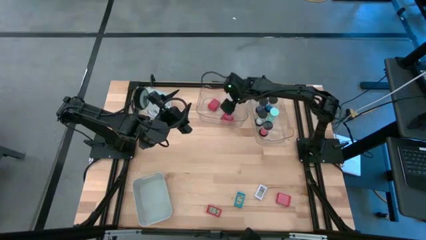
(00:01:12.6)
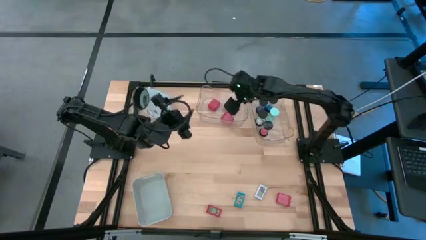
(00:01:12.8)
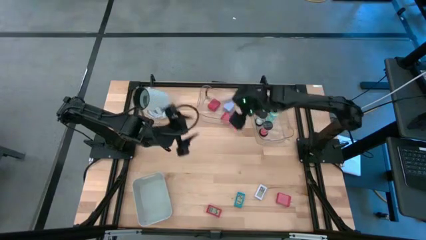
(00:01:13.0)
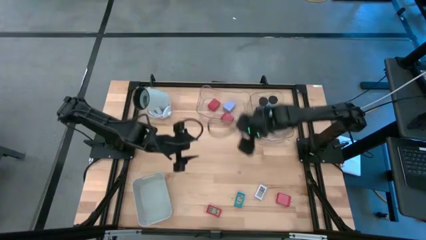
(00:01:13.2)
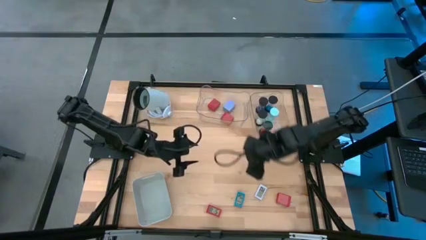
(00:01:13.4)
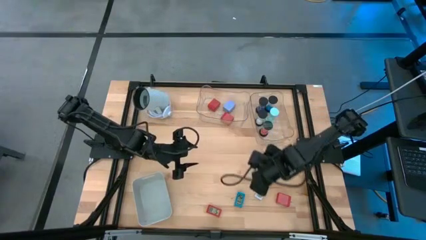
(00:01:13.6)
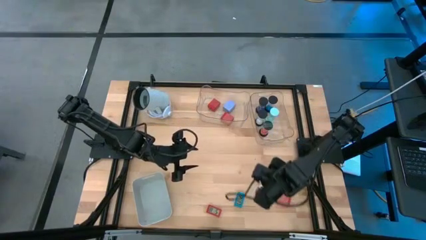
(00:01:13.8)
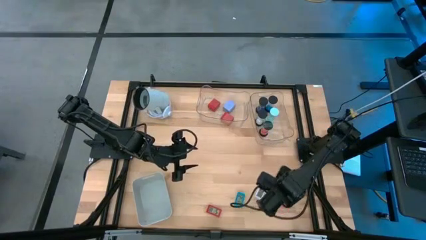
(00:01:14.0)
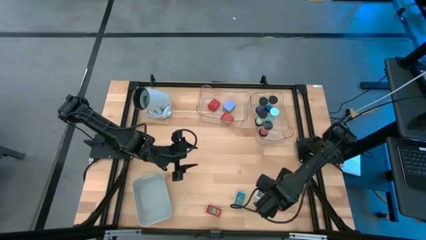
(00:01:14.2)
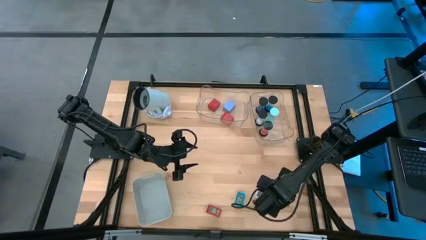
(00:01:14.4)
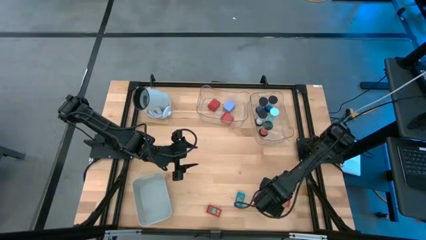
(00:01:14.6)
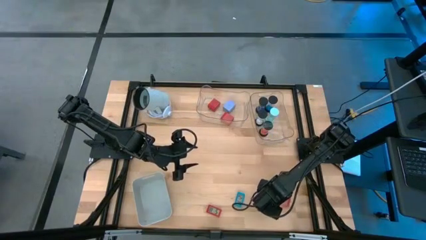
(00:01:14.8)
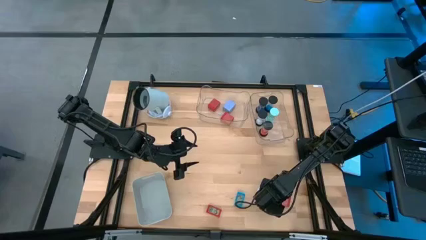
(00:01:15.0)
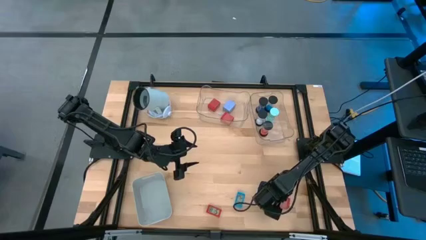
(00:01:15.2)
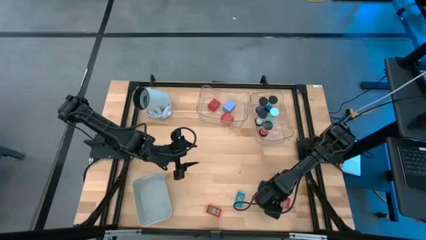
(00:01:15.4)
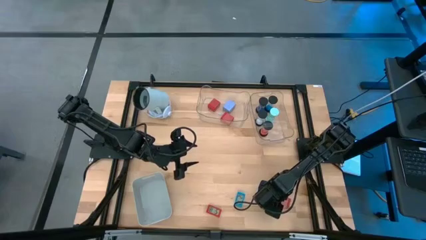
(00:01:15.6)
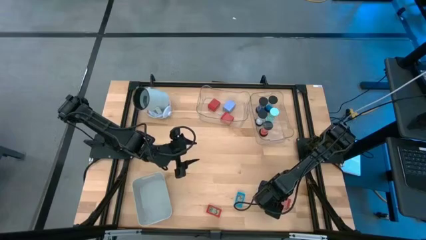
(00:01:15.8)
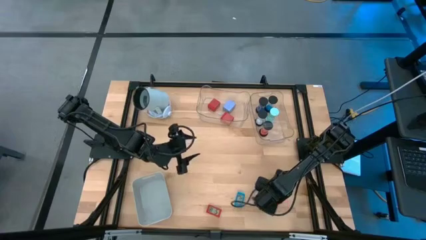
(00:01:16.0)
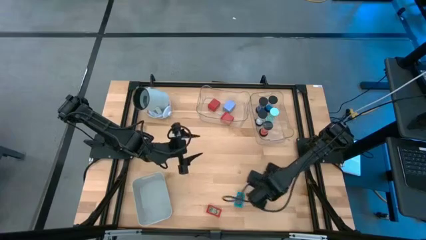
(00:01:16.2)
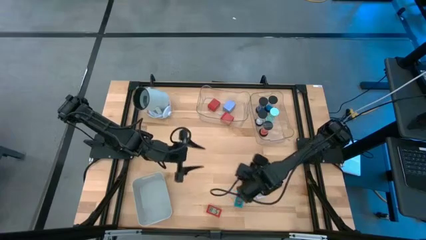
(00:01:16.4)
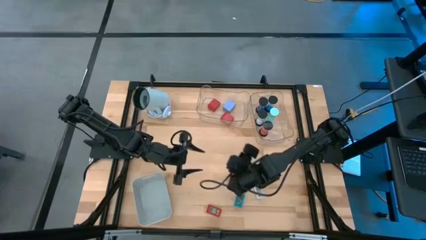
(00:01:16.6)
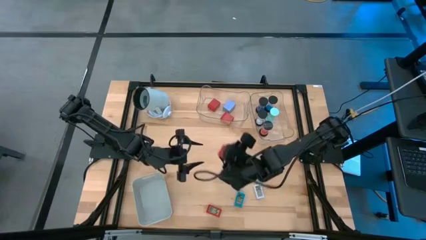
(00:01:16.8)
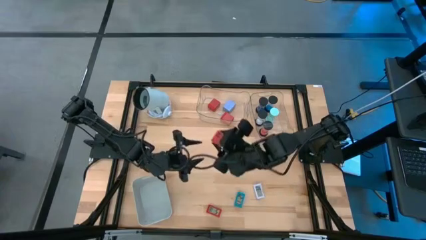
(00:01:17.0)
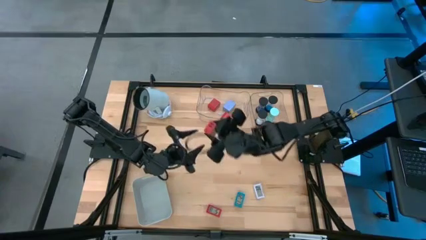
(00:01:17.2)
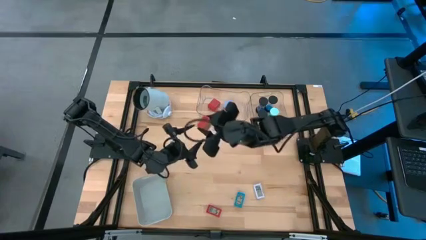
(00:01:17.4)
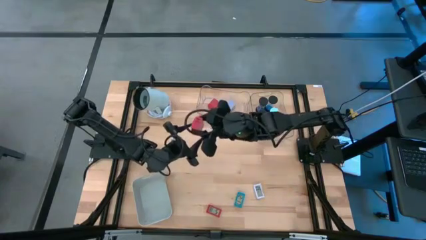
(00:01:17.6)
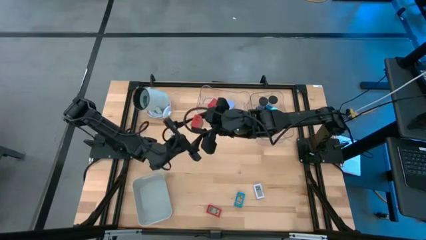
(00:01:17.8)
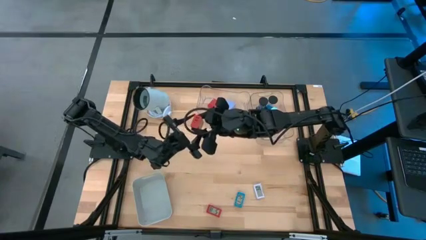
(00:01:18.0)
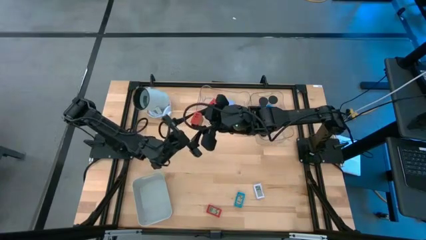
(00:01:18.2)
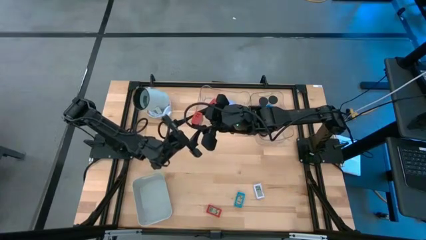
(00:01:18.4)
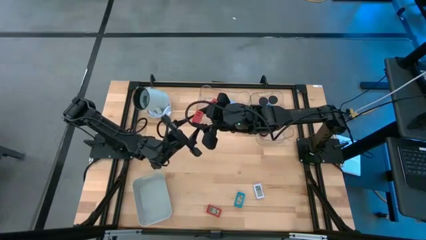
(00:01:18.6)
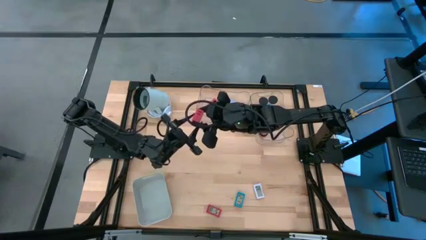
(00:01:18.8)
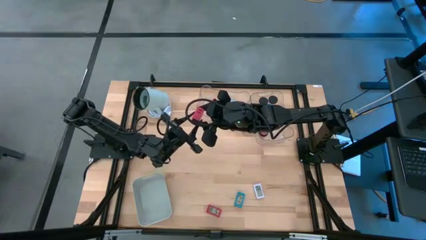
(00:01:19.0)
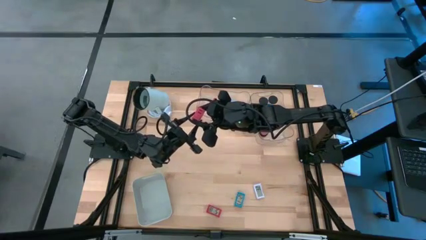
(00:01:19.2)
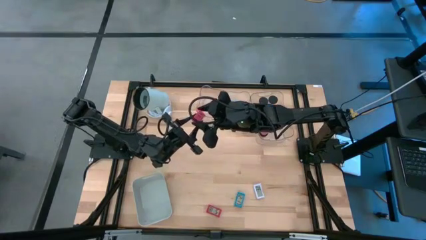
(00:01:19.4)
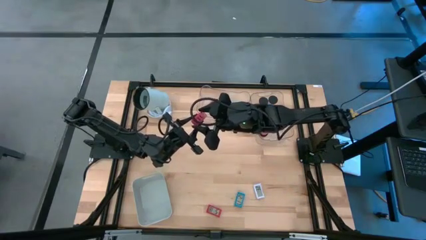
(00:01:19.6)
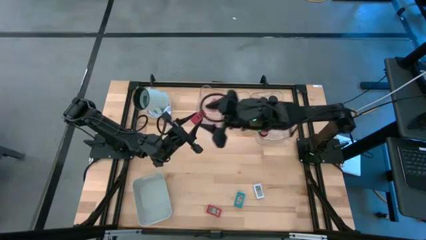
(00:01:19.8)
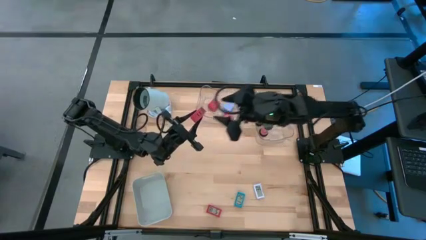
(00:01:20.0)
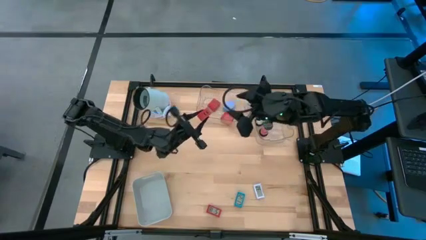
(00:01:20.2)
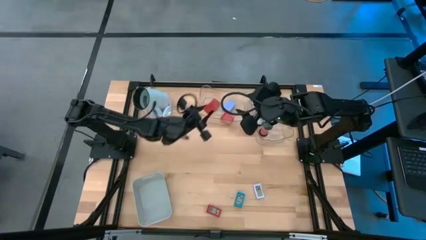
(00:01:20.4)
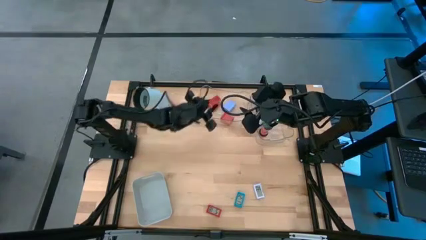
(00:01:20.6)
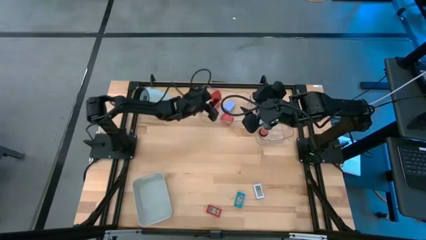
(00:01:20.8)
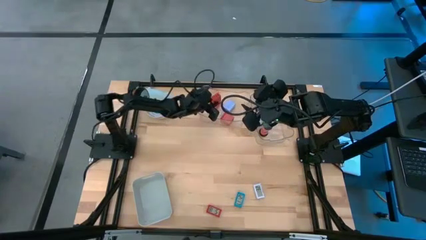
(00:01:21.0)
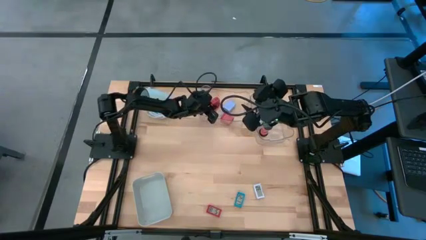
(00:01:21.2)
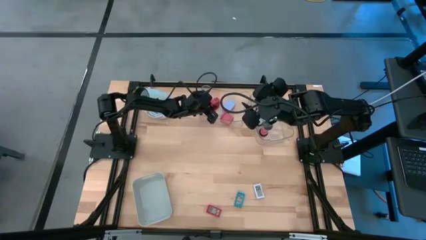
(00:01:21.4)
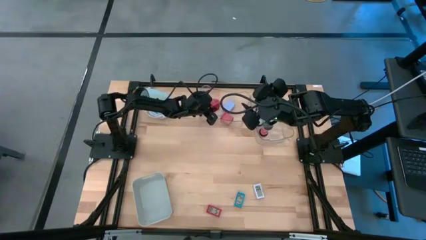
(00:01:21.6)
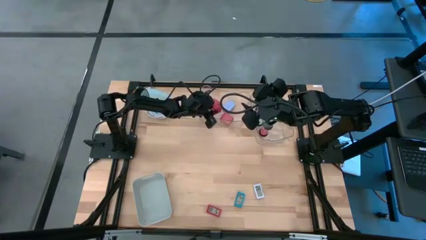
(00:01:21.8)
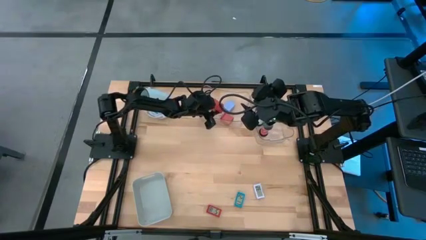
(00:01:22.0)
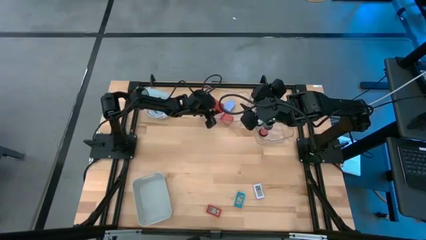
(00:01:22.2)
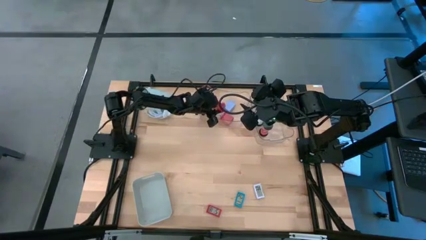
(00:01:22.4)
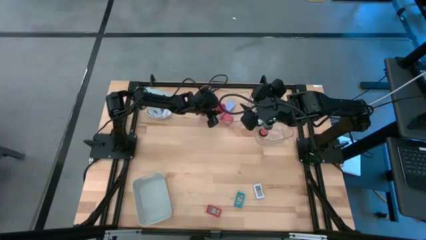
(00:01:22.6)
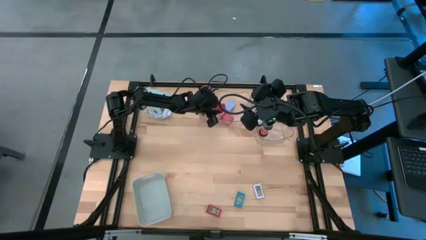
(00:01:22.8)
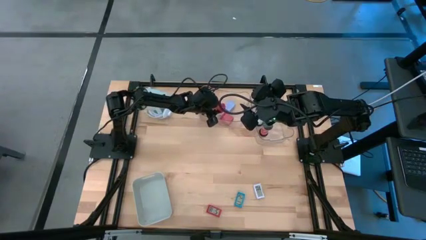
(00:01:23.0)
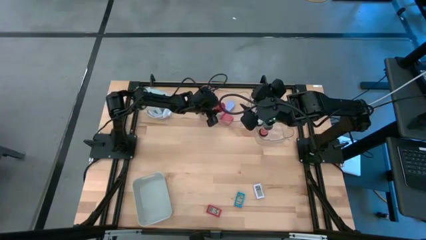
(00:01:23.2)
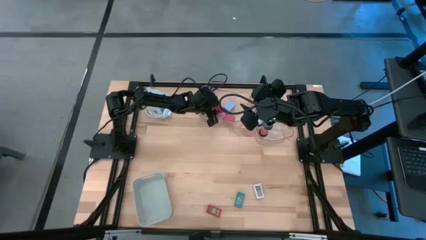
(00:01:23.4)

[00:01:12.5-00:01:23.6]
Task: Pick & Place Office items
Put the red charger adapter into the left transparent bin

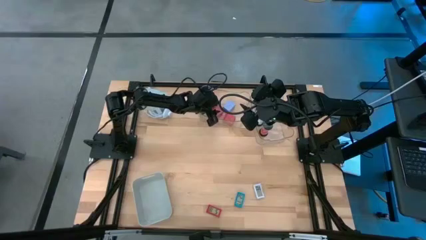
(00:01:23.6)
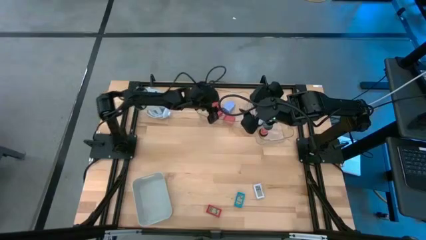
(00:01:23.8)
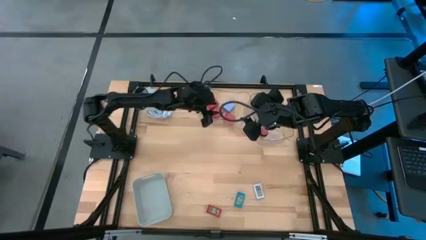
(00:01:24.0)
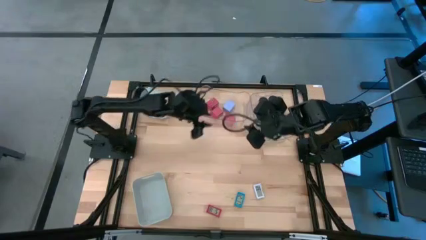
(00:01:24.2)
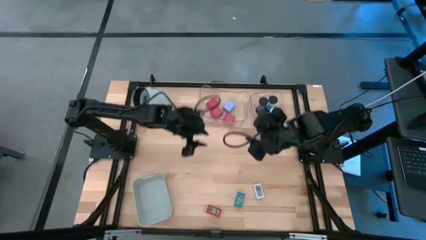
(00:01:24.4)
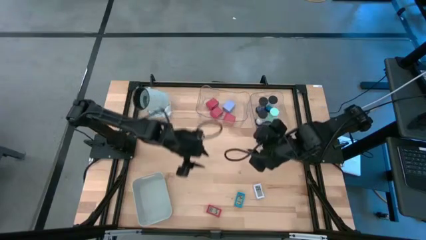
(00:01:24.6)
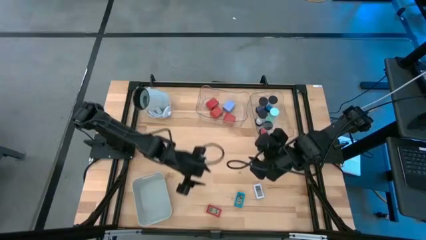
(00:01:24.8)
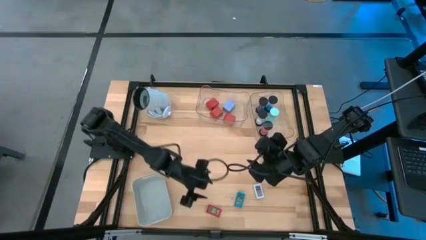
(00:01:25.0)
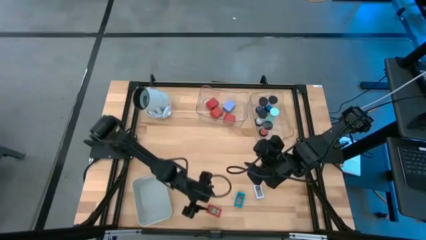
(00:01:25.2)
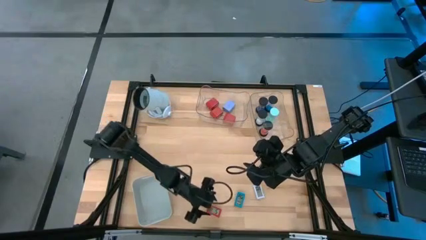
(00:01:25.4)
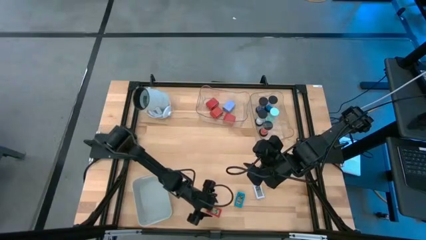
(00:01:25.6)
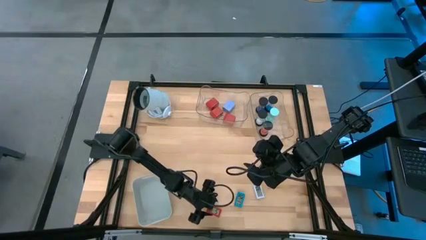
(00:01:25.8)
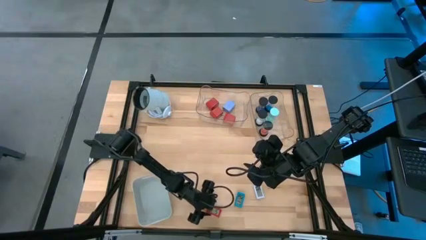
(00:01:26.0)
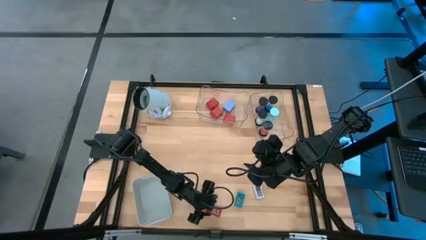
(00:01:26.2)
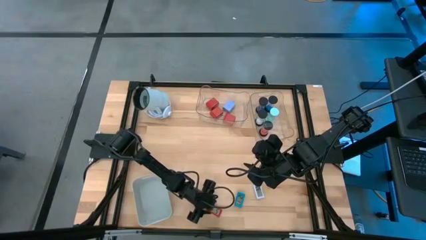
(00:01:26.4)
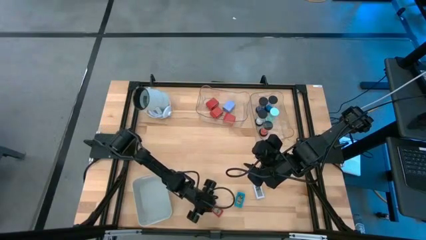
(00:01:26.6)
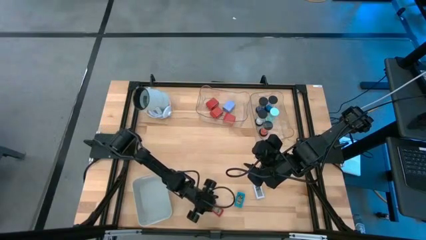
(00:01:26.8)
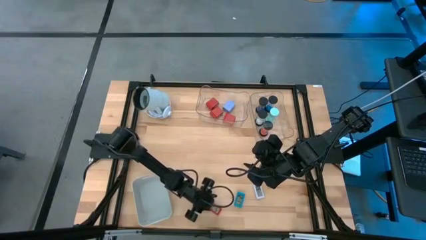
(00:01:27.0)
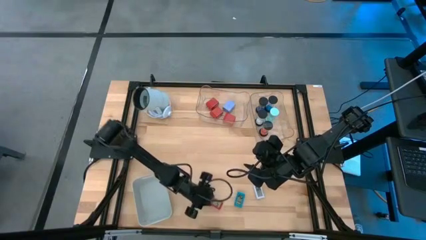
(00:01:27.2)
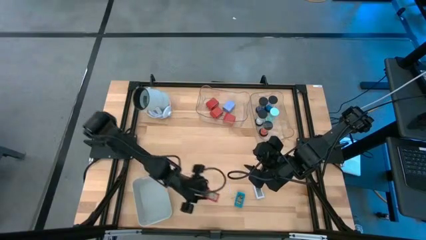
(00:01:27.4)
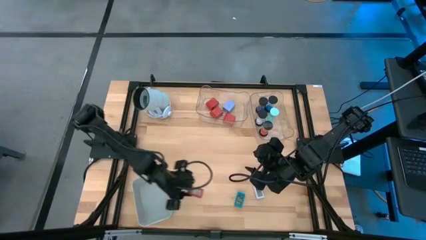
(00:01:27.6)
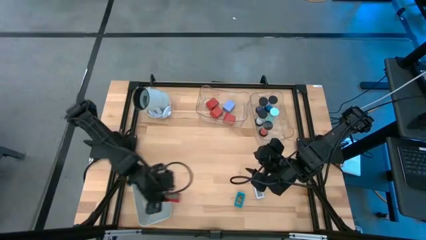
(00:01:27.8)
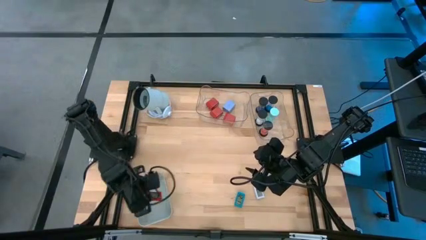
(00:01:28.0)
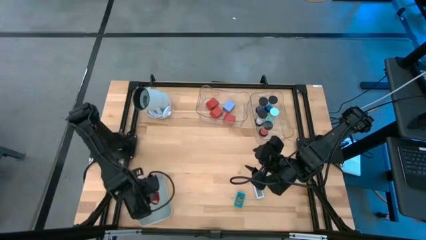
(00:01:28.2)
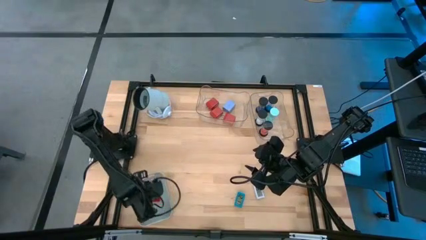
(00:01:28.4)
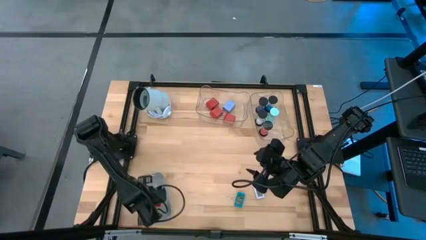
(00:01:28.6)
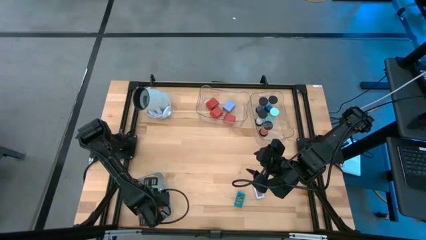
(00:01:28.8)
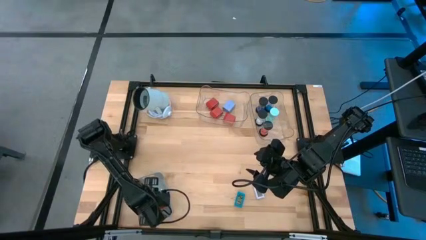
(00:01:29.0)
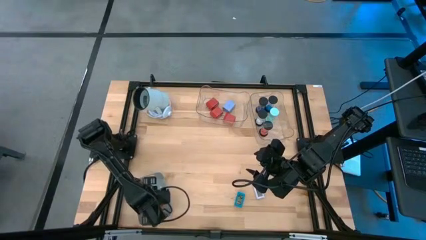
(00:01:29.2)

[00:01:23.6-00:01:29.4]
Put the red digital clock into the gray bin

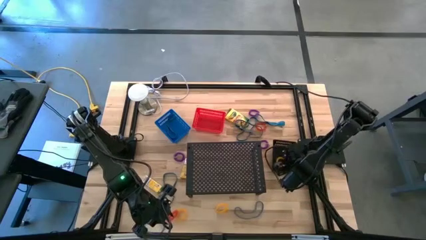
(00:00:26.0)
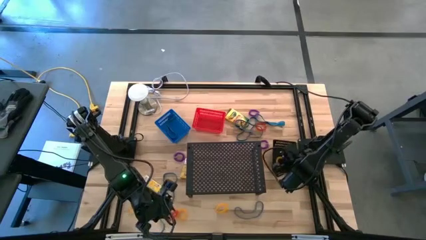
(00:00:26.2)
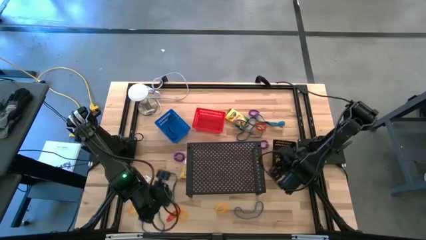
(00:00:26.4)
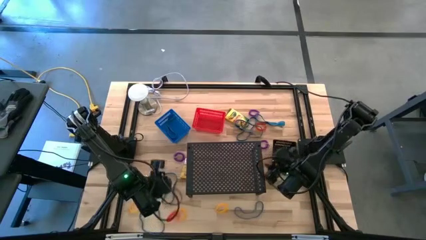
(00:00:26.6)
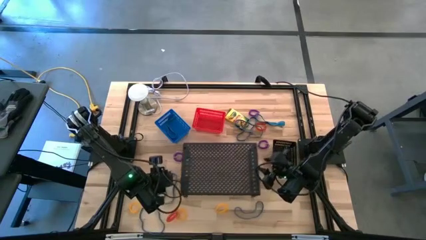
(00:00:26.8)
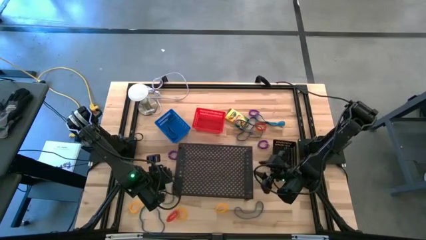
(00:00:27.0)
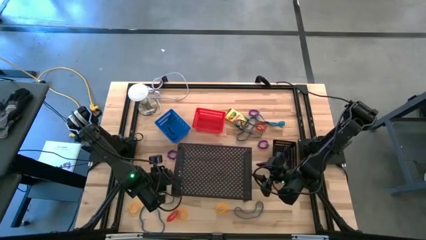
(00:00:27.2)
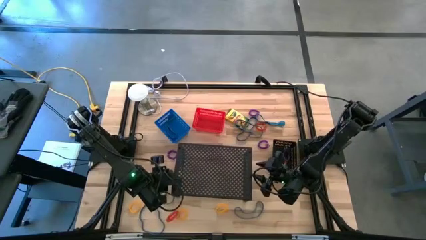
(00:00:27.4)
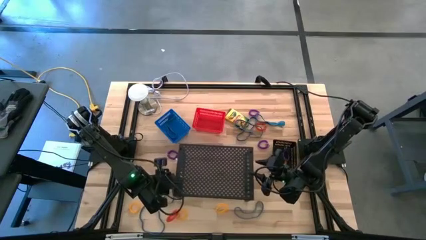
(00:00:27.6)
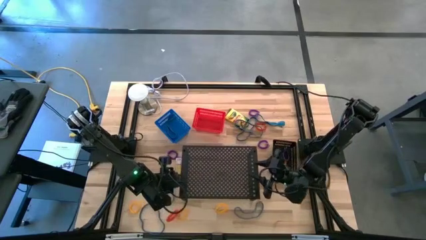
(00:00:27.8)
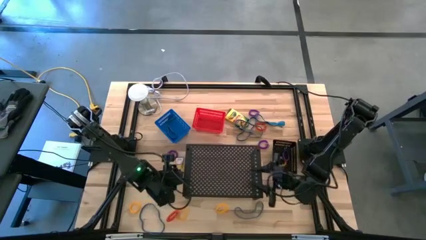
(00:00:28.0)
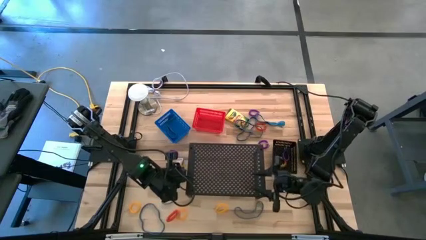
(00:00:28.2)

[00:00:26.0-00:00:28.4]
Task: Pick & Place Office Desk Supplies
Adjust the shelf
